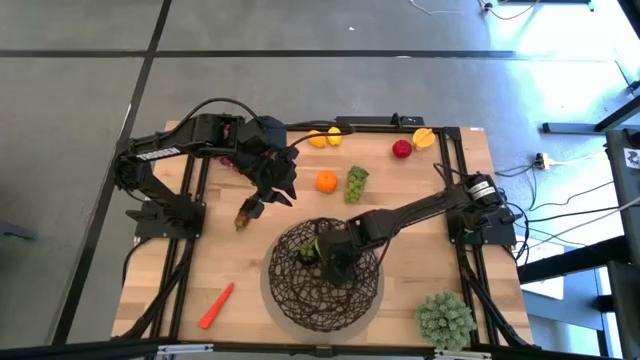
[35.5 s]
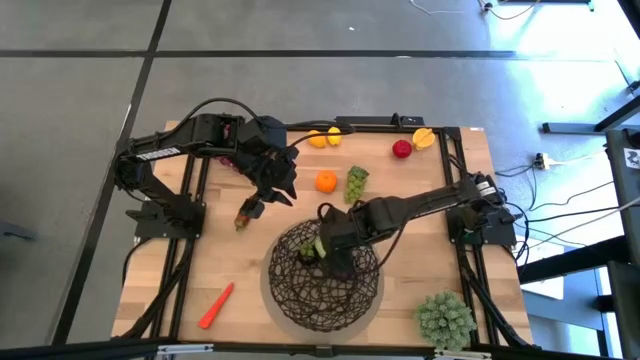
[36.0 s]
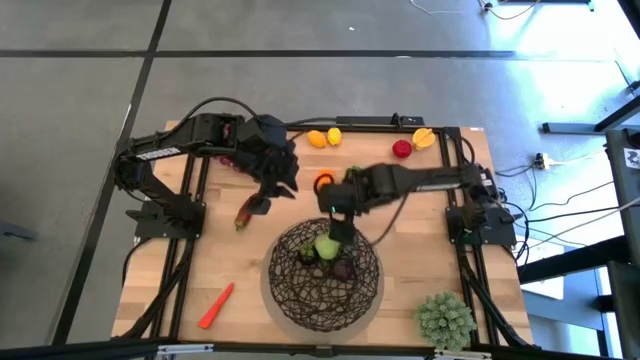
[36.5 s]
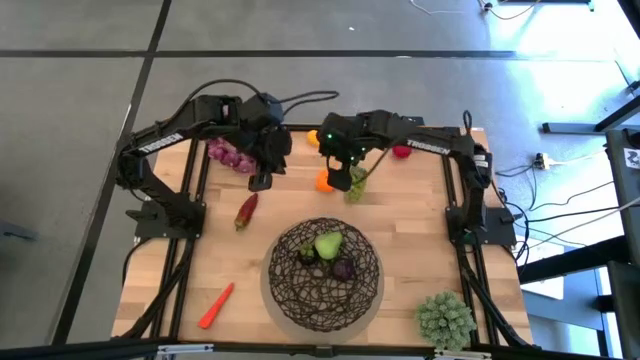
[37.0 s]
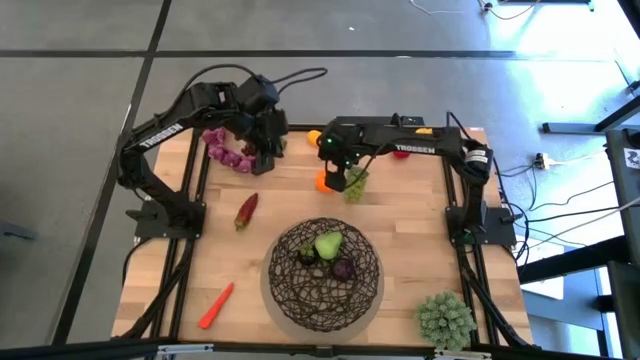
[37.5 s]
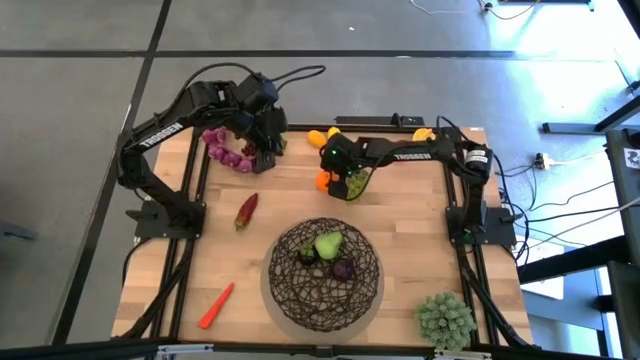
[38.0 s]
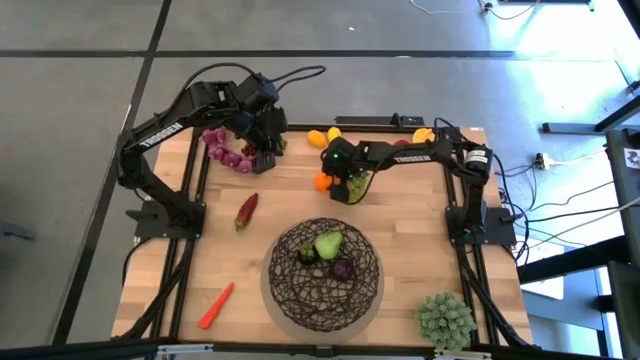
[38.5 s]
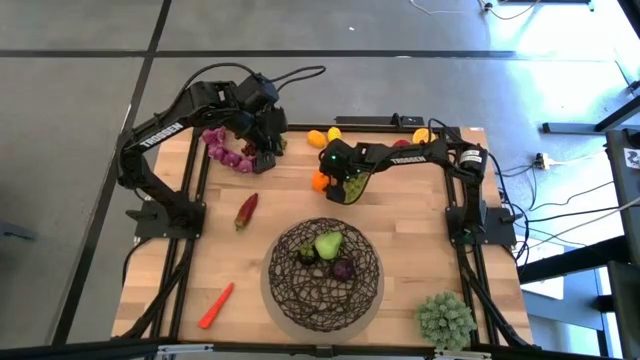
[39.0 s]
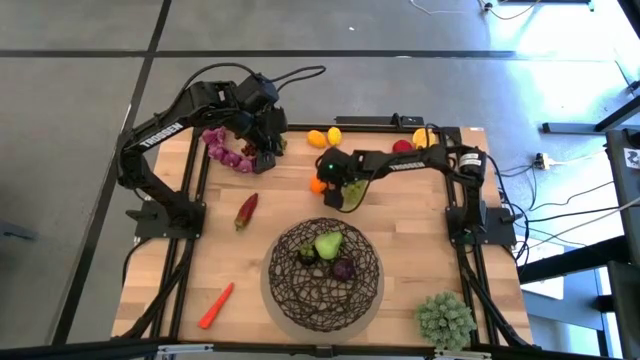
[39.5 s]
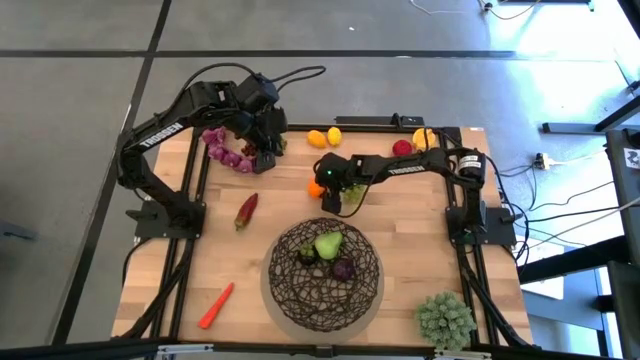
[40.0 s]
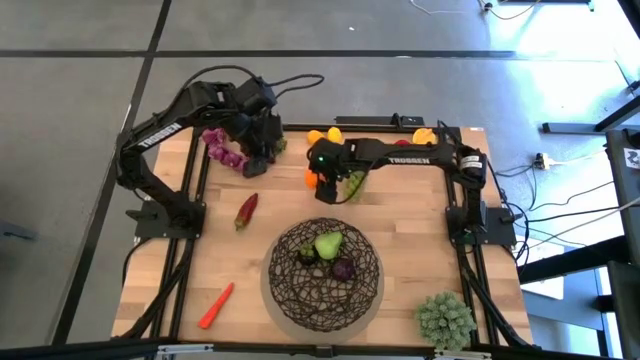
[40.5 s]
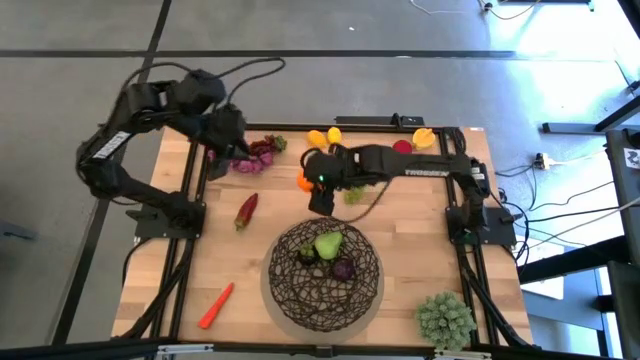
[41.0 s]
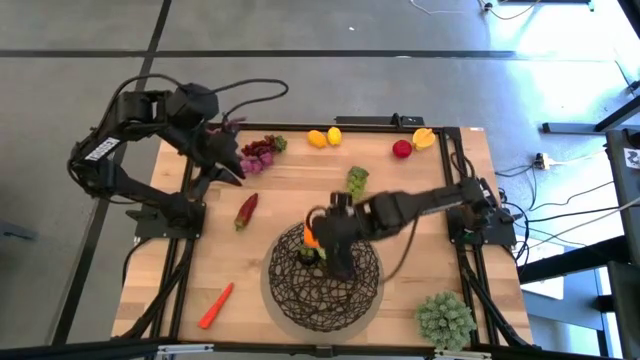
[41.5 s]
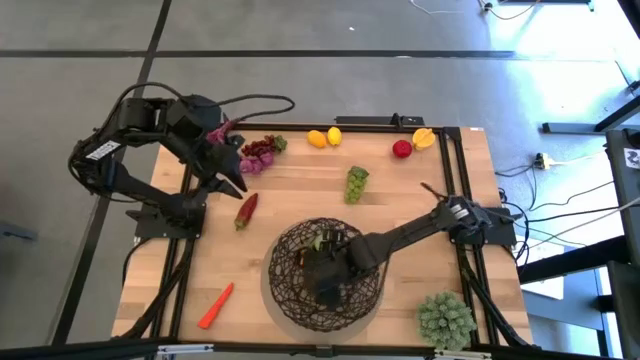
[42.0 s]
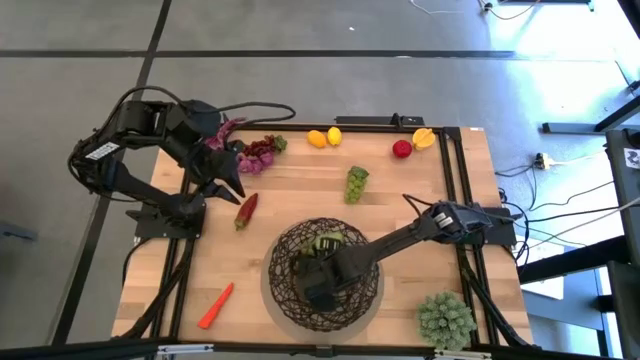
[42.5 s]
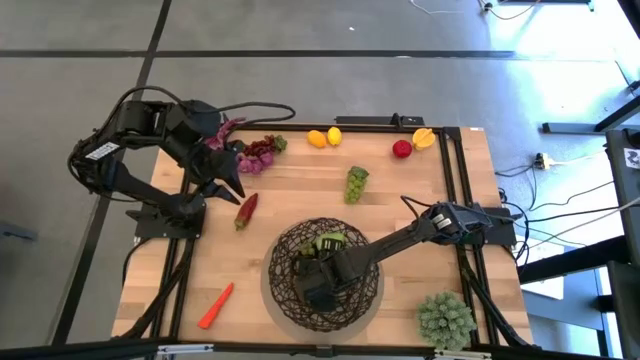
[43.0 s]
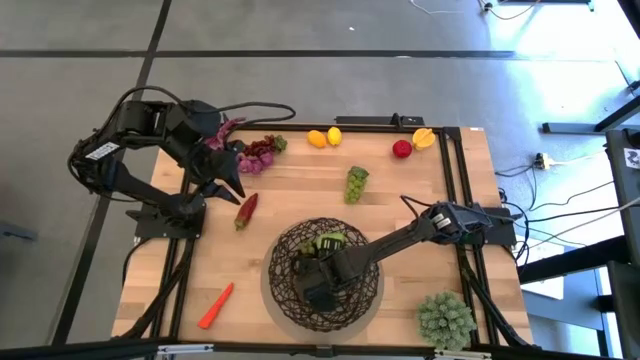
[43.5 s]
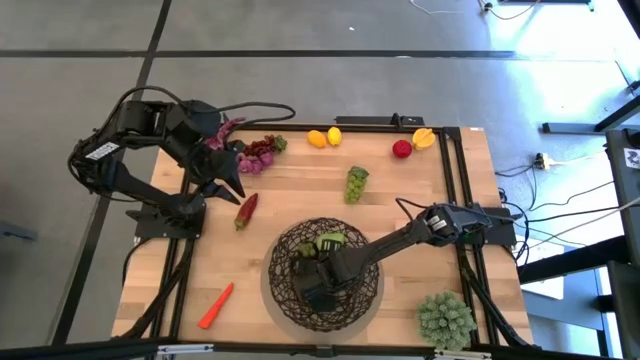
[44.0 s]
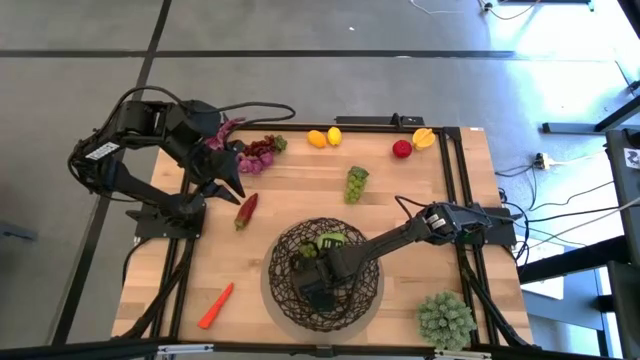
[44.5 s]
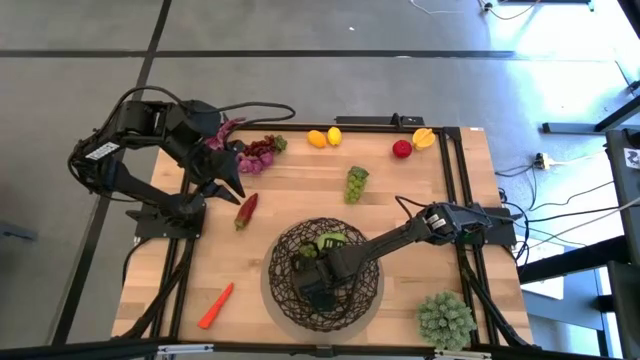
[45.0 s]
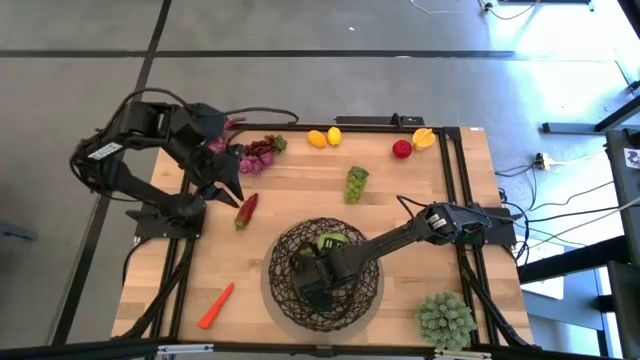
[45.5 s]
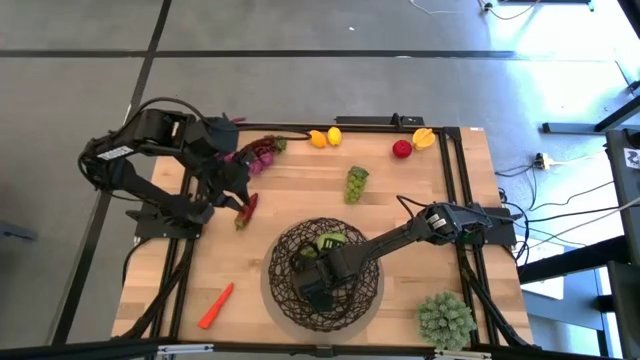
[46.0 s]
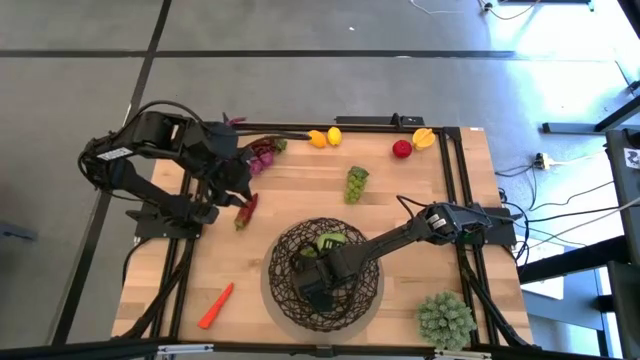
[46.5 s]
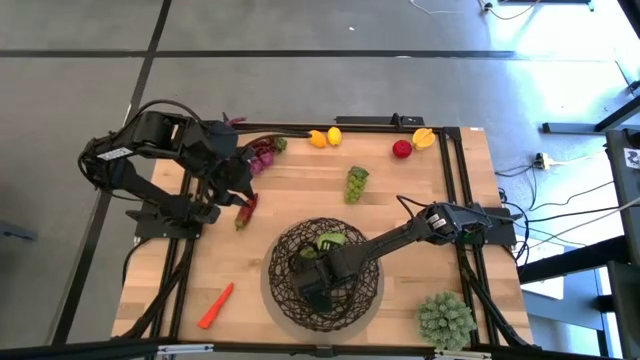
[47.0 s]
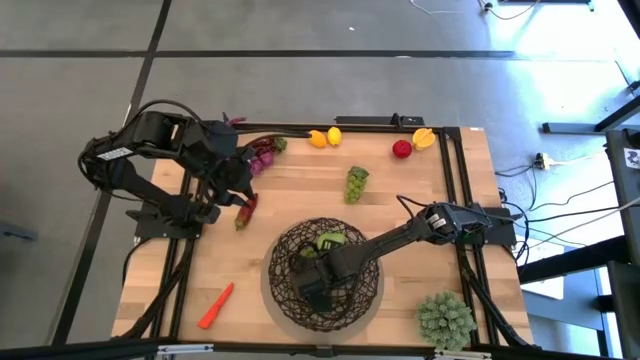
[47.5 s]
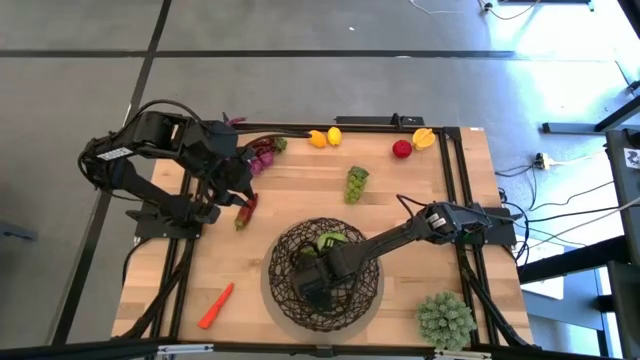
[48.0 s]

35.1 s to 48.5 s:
Task: Build produce basket
Put the orange into the mesh basket

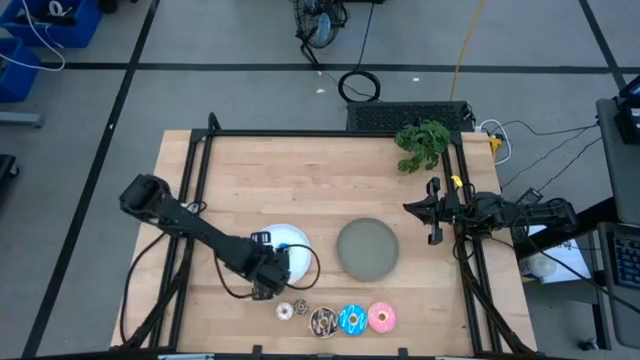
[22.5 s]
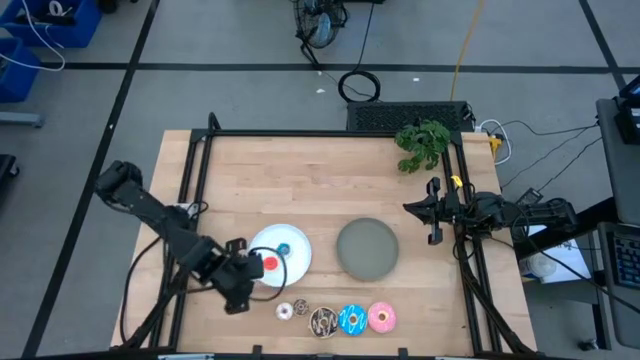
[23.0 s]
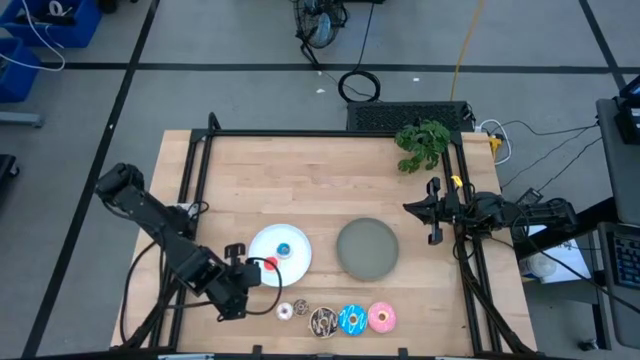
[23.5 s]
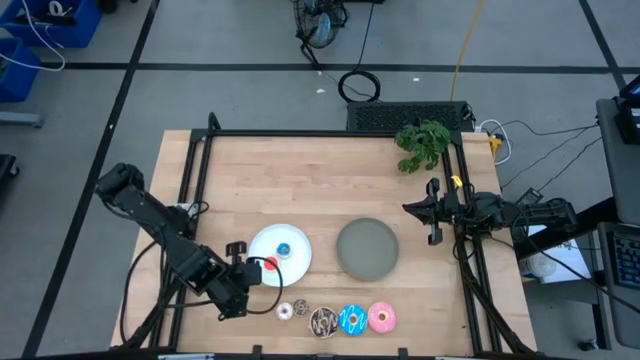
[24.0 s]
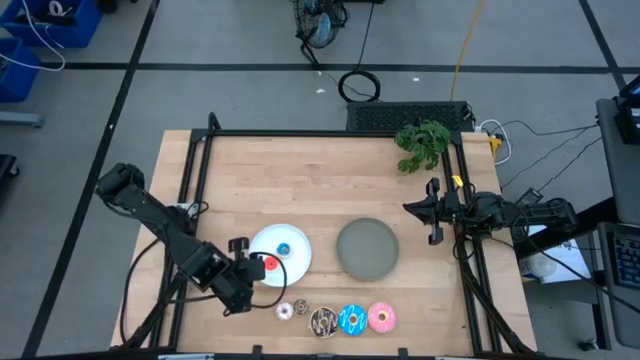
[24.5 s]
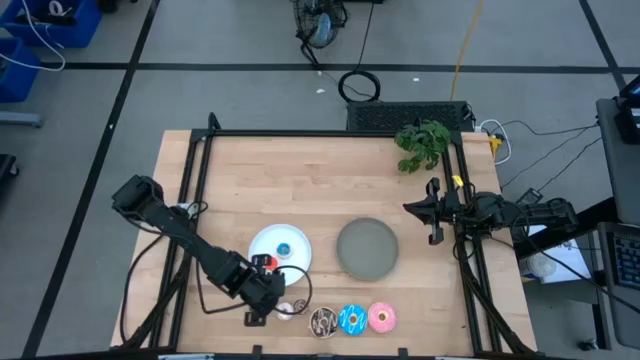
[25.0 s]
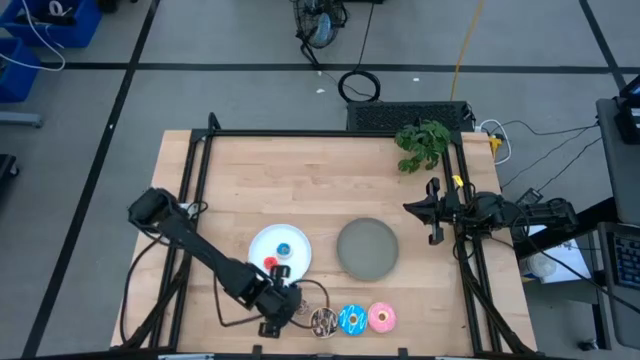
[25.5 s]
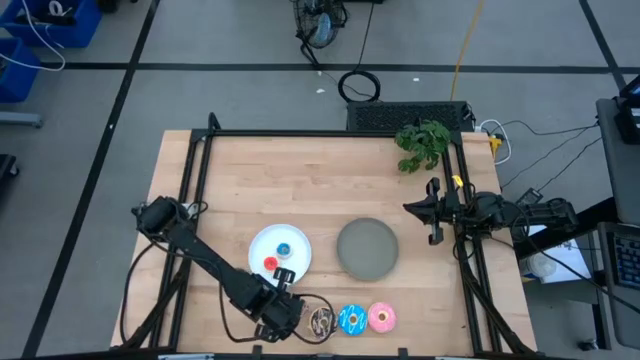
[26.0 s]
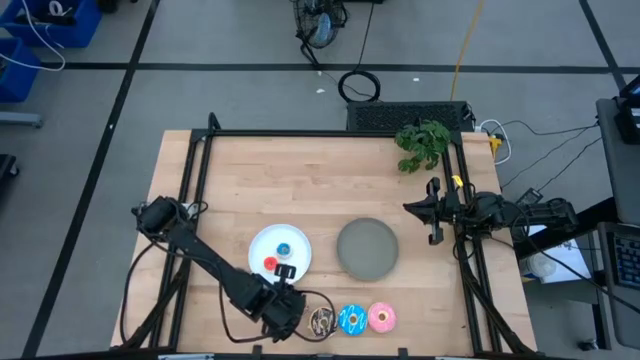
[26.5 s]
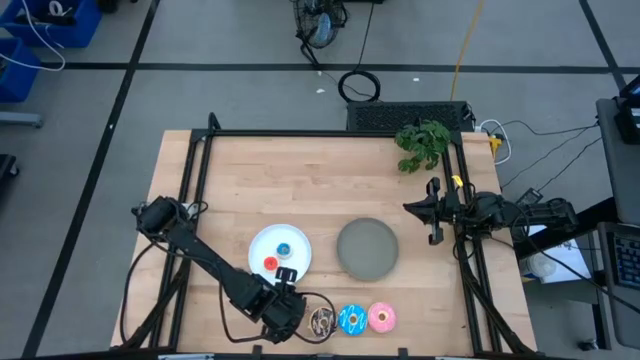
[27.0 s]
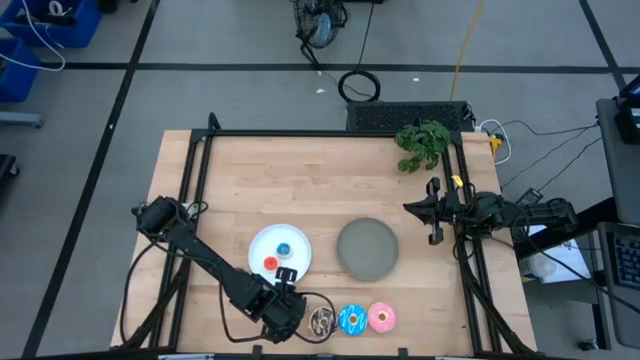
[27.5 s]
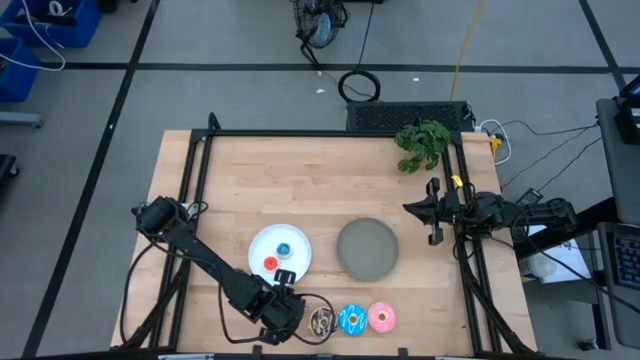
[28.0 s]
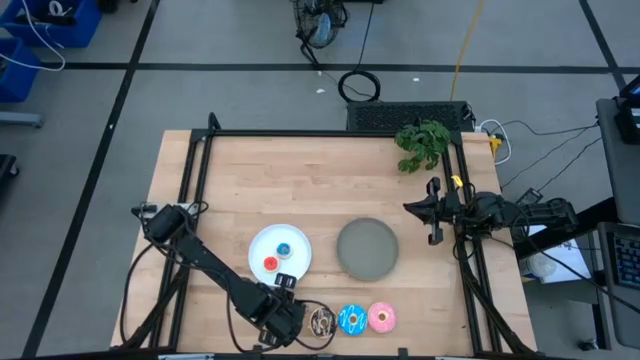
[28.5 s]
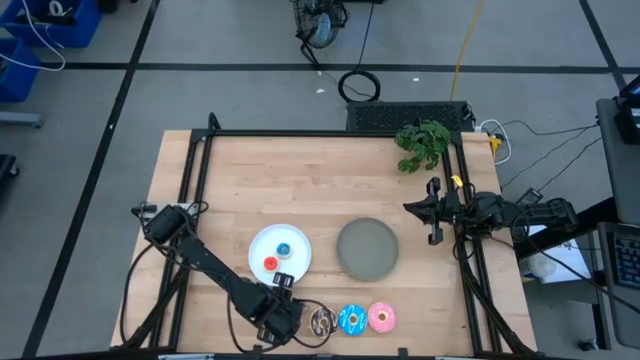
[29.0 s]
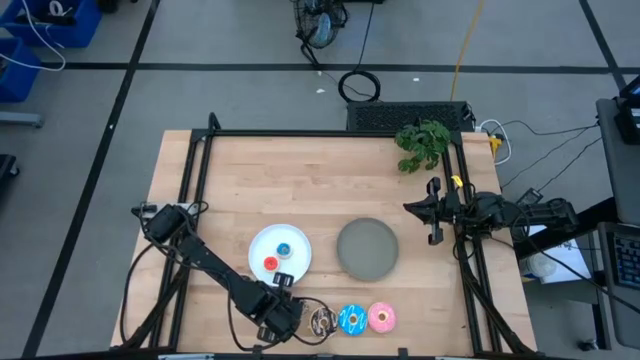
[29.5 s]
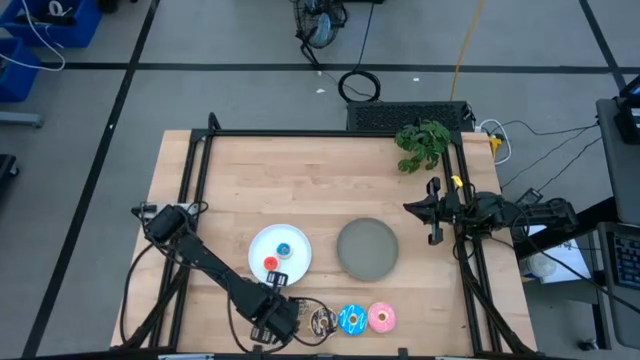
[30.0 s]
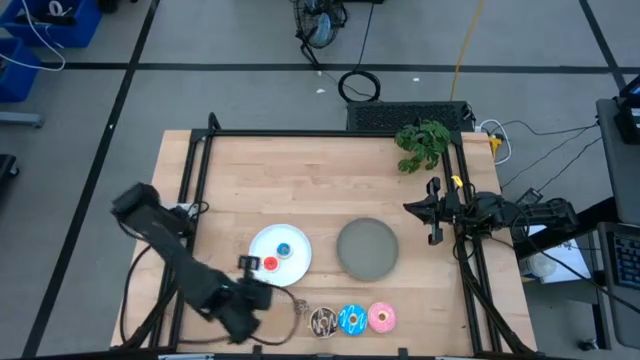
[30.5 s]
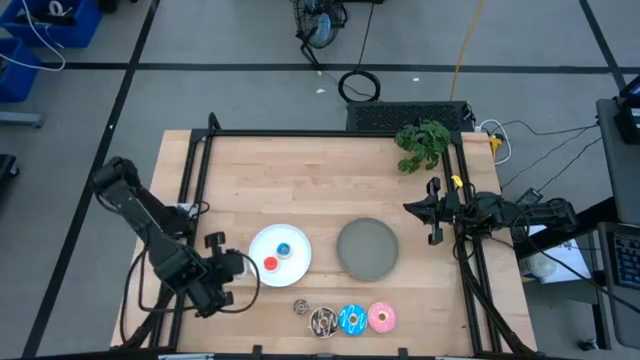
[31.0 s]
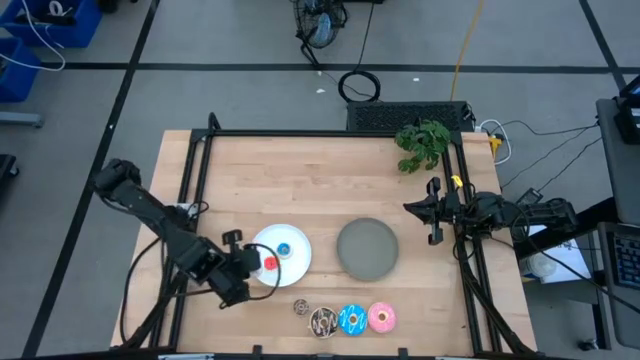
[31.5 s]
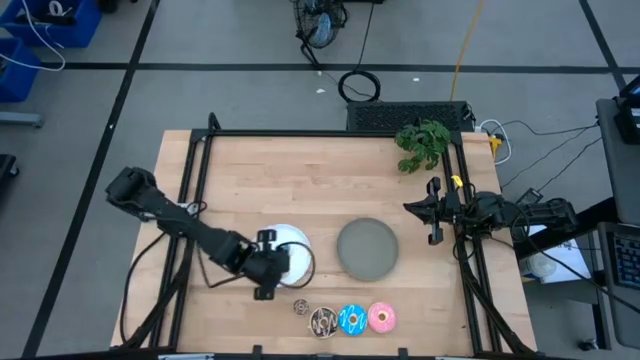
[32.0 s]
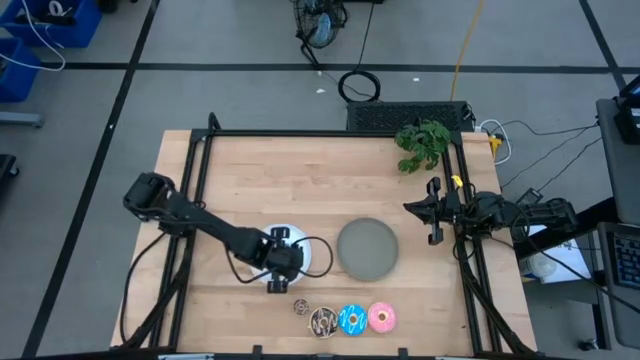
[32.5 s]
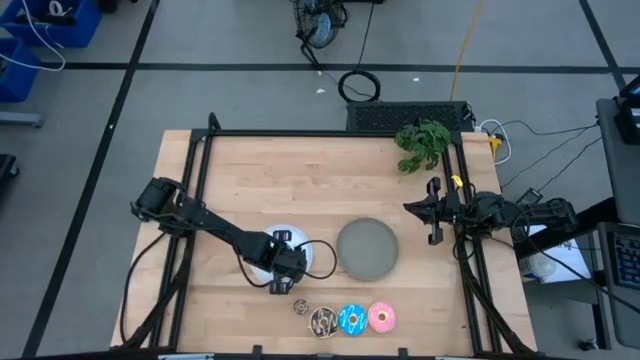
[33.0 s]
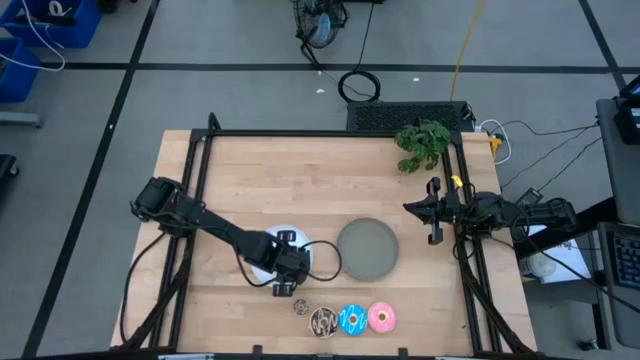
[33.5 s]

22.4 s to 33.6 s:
Task: Pick & Place donuts
Put the small white donut on the white plate
